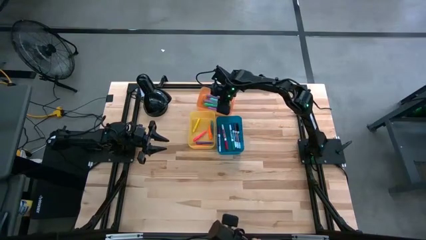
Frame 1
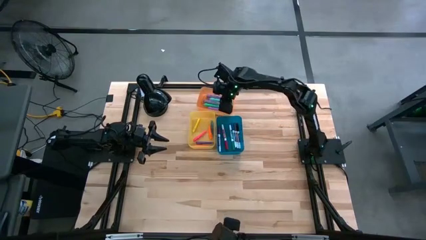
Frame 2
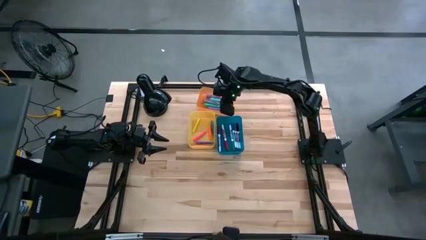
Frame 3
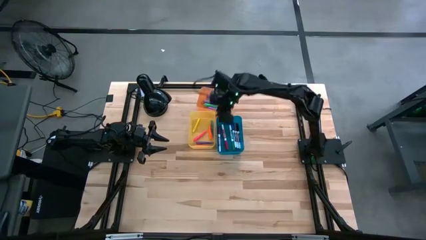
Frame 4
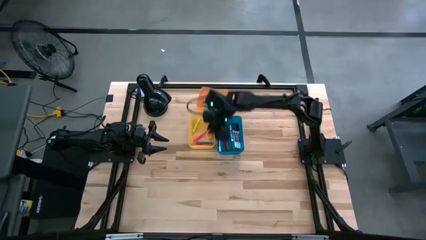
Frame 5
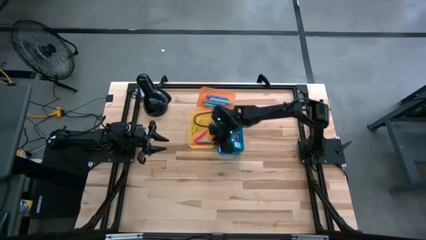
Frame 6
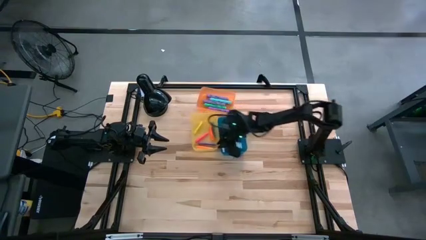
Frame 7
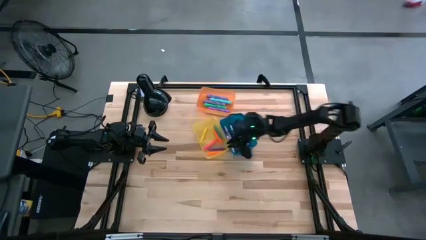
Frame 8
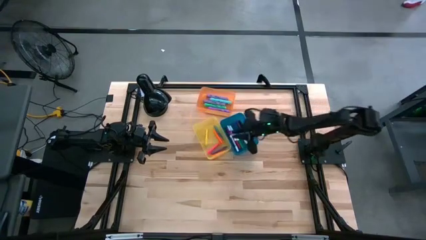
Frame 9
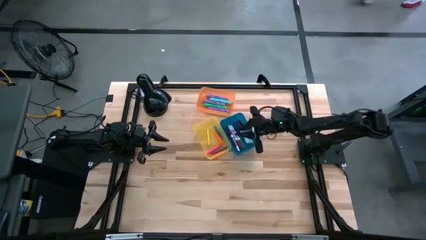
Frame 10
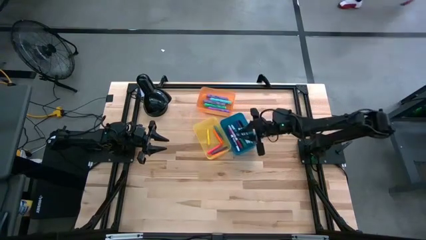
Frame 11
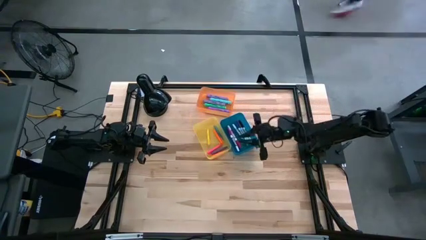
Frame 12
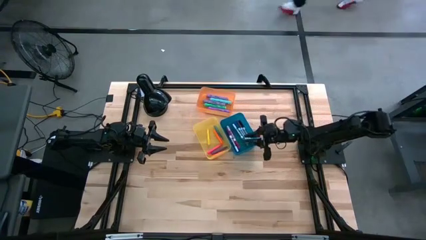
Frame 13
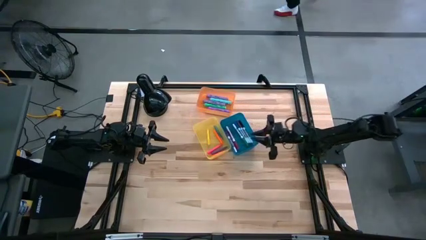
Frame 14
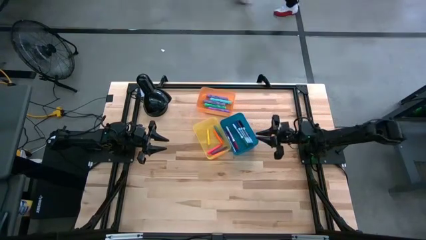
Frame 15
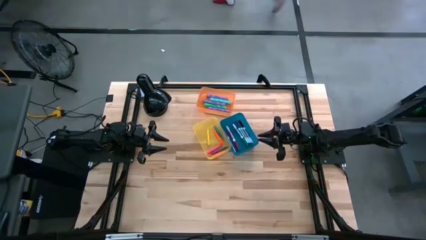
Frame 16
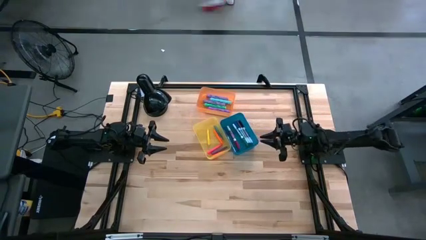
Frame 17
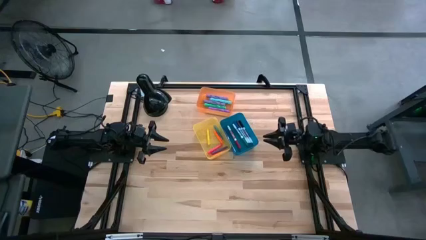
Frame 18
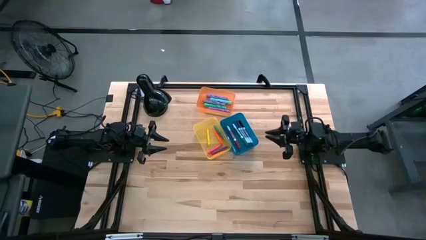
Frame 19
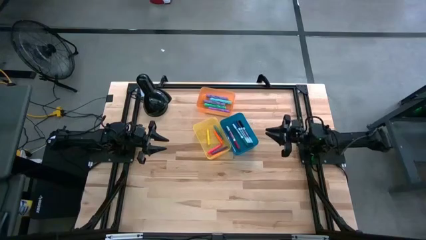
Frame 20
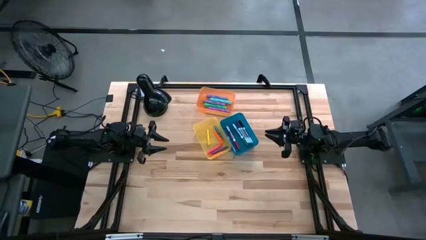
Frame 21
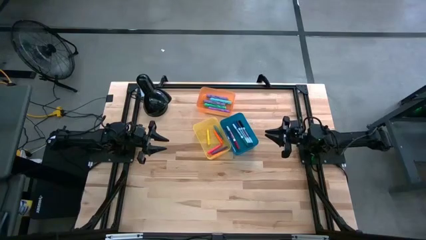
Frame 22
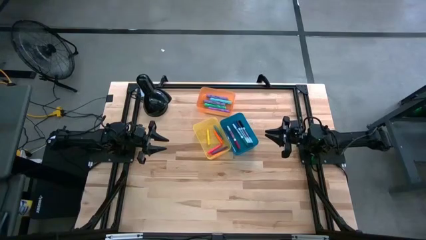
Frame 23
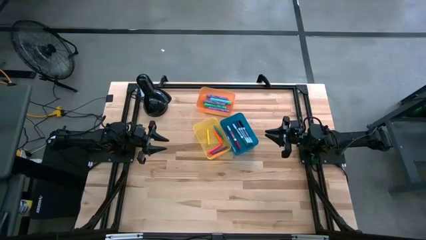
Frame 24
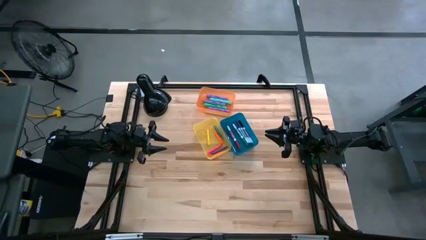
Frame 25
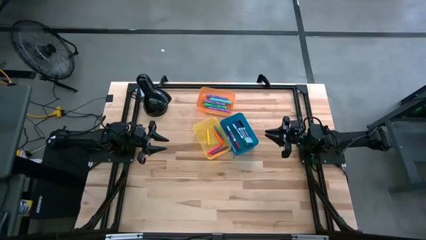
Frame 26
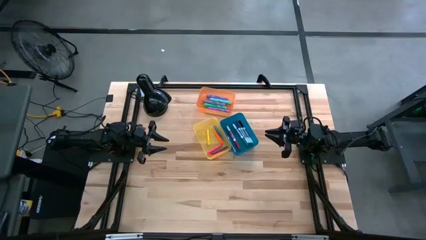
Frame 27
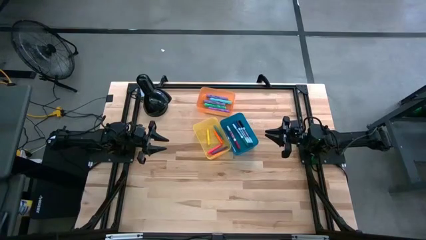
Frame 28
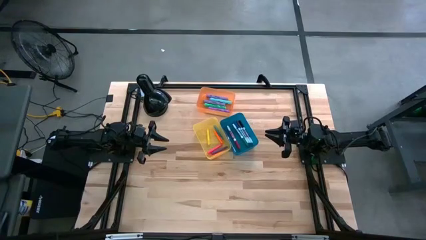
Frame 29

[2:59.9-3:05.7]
Task: Pick & Place Markers
Return to Home Position

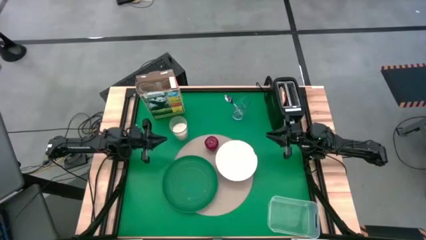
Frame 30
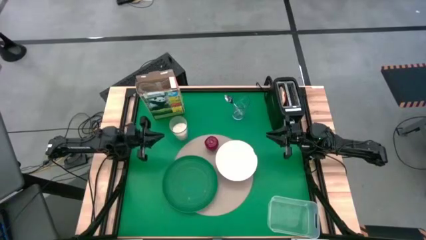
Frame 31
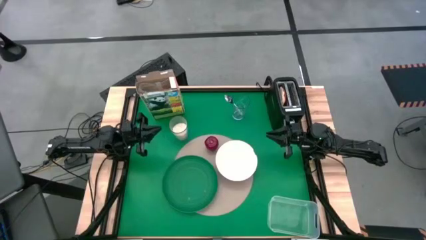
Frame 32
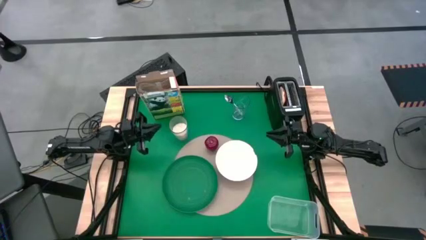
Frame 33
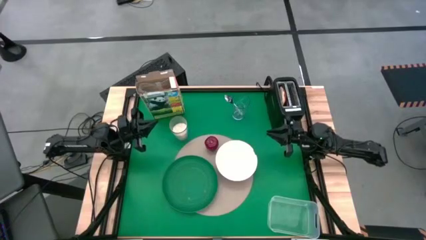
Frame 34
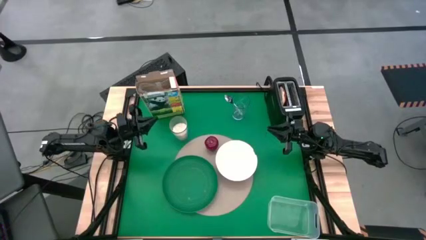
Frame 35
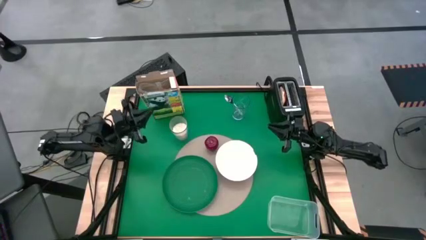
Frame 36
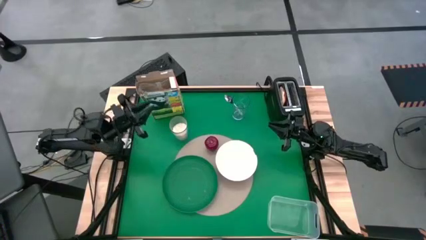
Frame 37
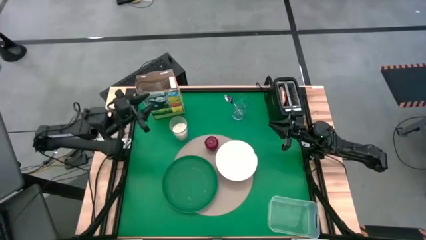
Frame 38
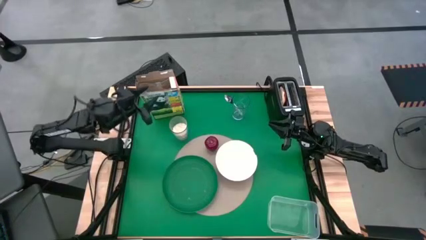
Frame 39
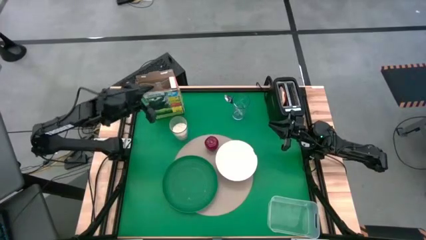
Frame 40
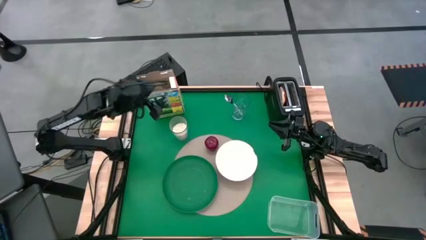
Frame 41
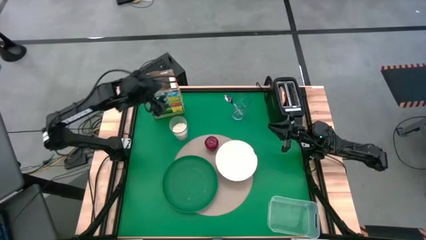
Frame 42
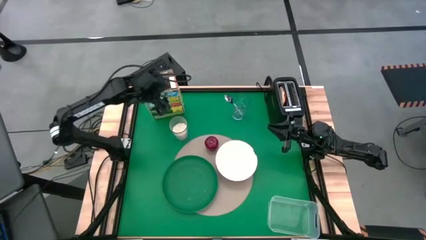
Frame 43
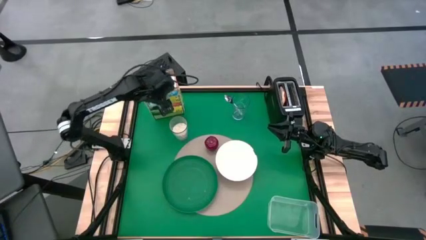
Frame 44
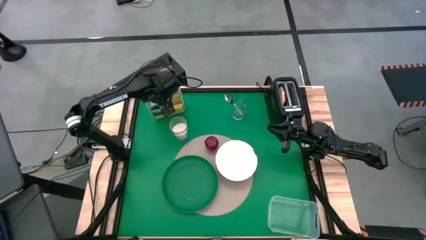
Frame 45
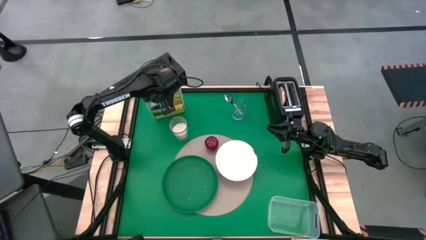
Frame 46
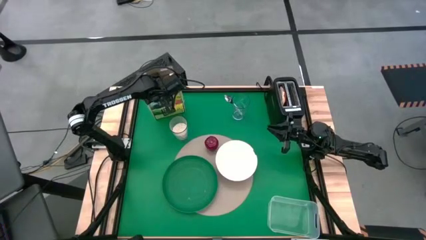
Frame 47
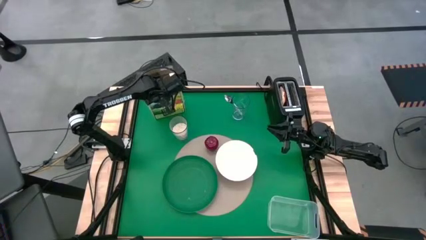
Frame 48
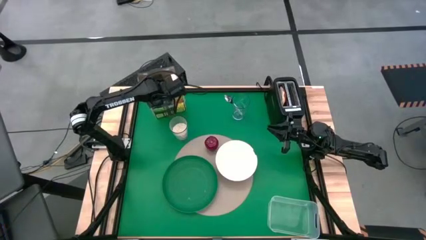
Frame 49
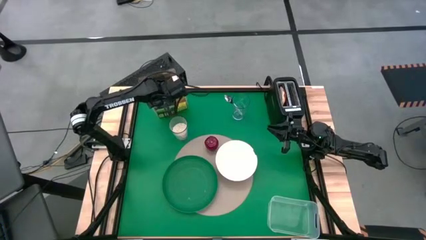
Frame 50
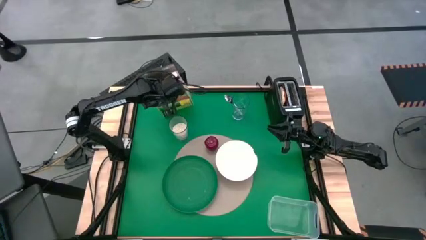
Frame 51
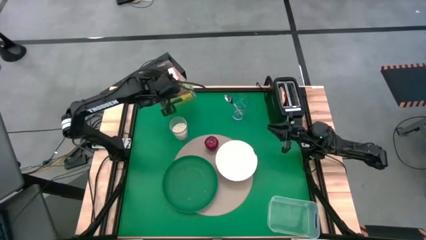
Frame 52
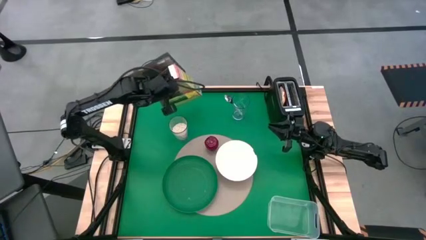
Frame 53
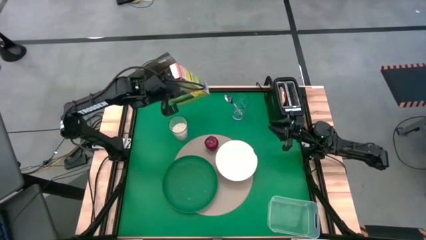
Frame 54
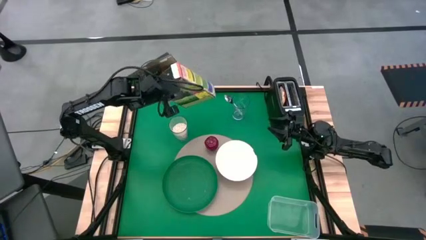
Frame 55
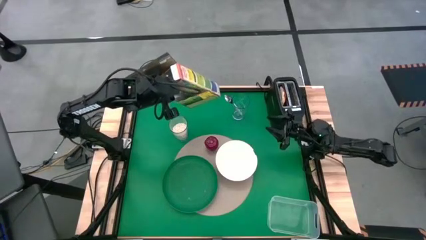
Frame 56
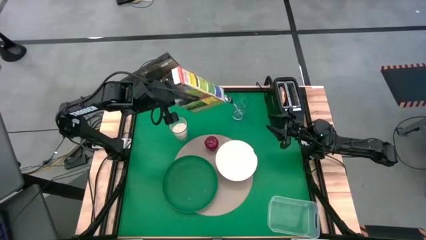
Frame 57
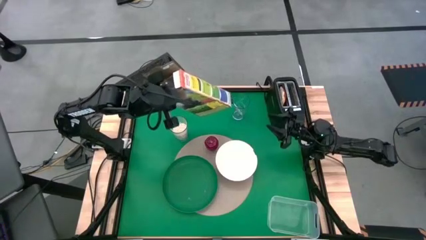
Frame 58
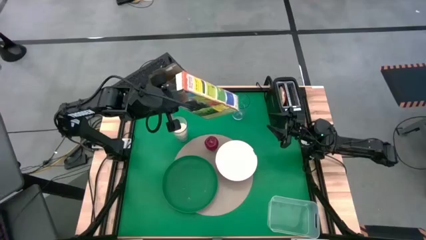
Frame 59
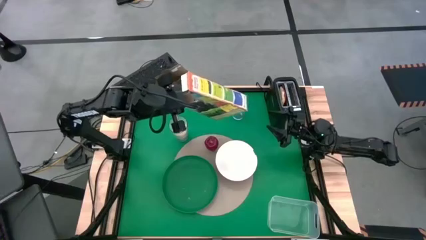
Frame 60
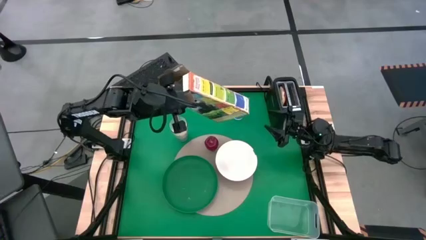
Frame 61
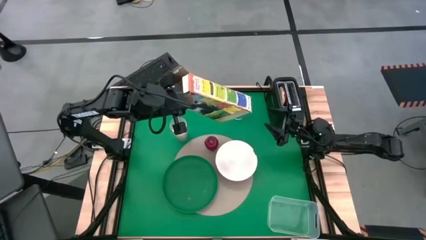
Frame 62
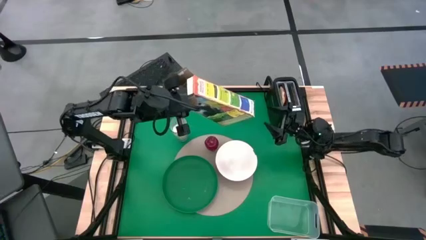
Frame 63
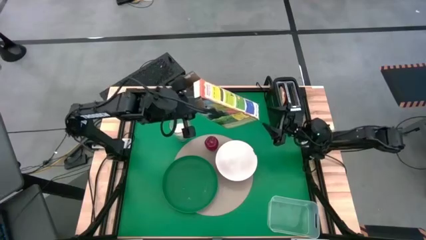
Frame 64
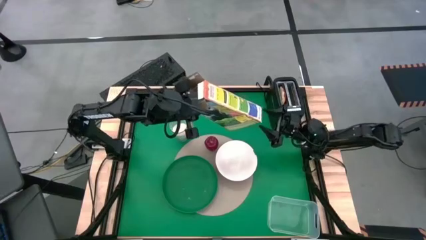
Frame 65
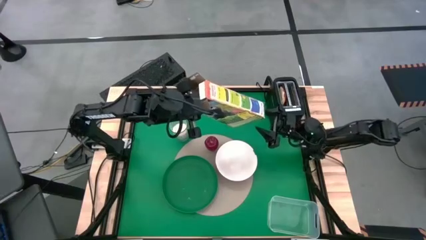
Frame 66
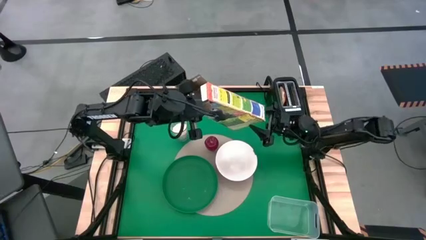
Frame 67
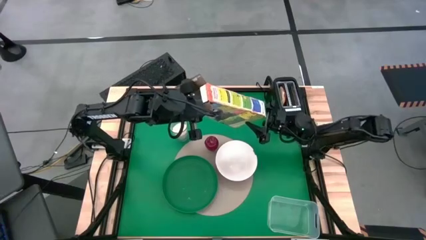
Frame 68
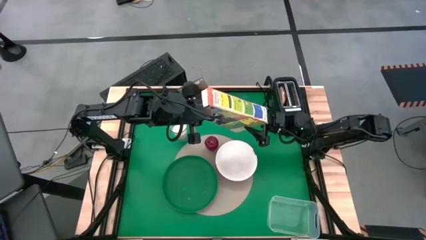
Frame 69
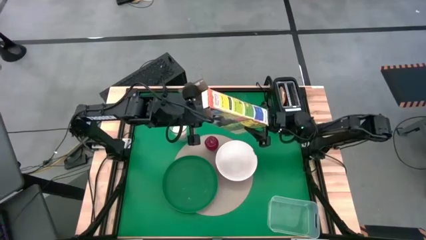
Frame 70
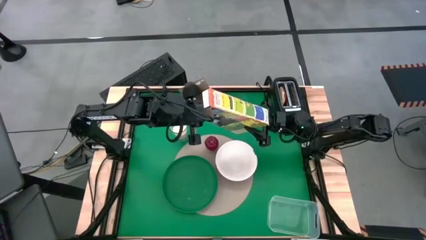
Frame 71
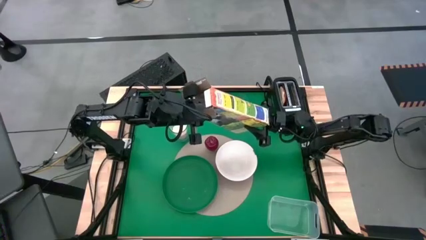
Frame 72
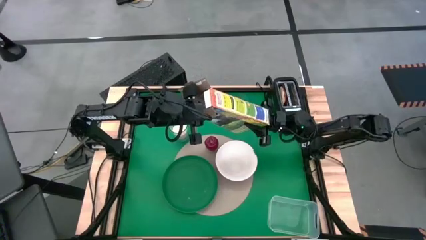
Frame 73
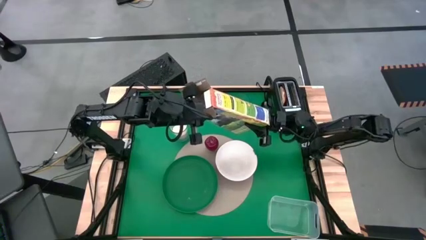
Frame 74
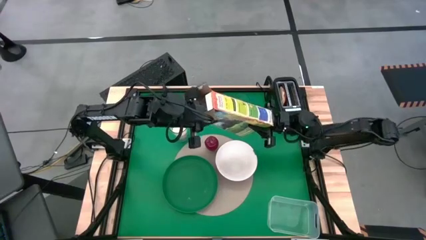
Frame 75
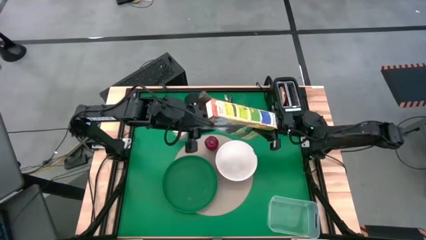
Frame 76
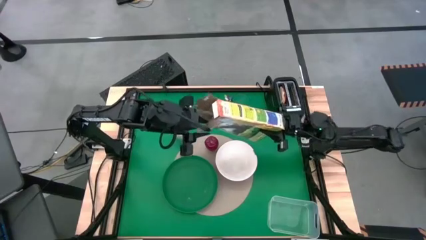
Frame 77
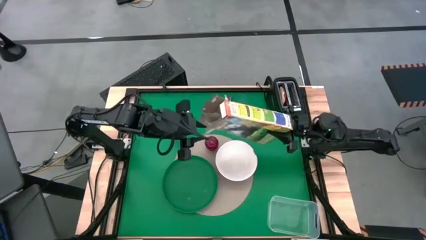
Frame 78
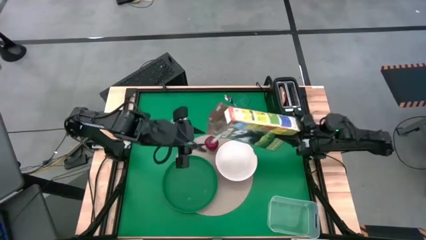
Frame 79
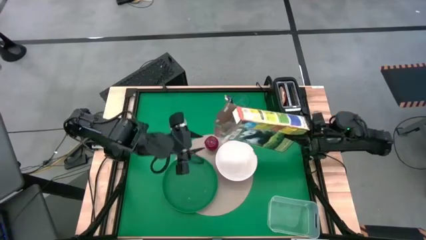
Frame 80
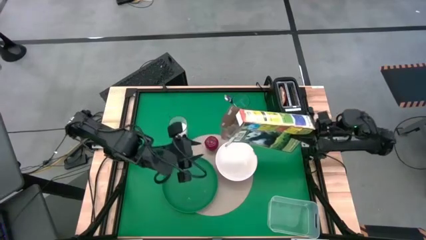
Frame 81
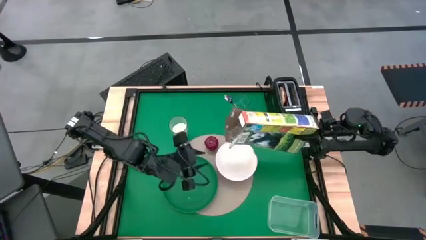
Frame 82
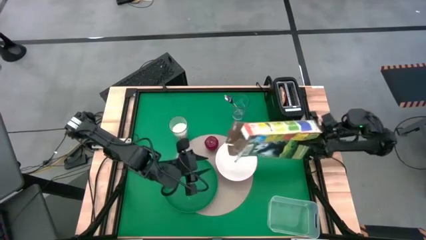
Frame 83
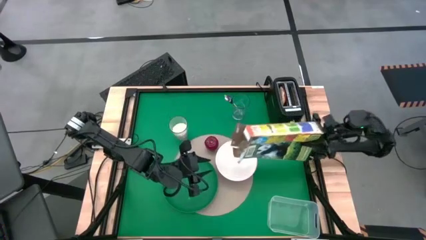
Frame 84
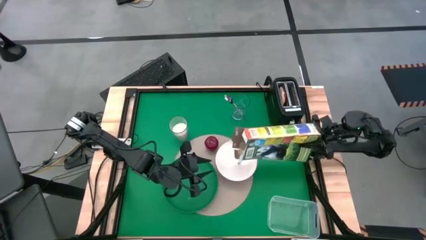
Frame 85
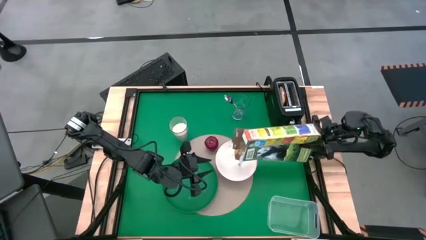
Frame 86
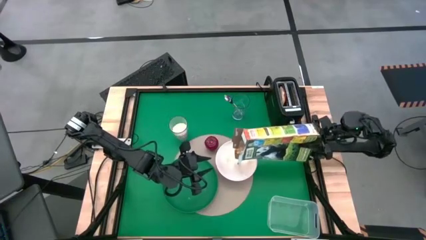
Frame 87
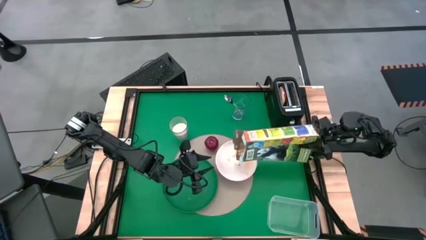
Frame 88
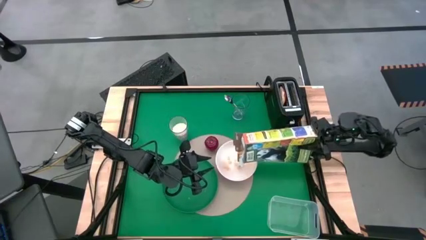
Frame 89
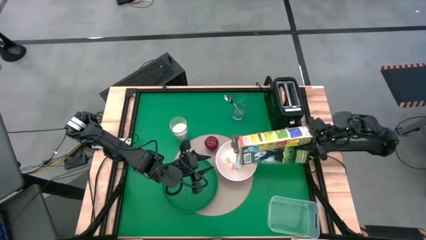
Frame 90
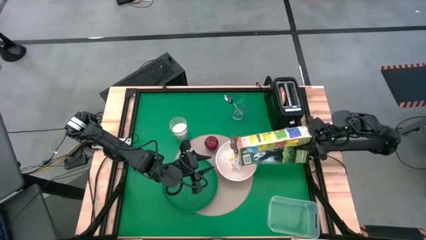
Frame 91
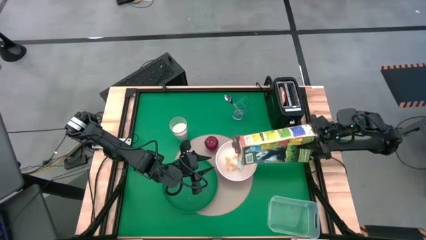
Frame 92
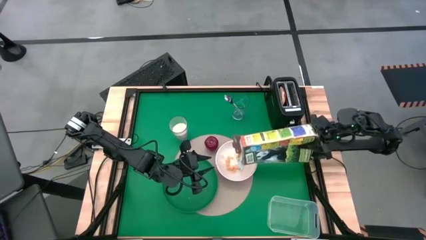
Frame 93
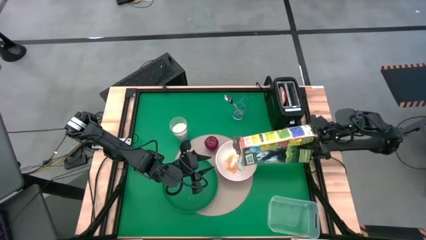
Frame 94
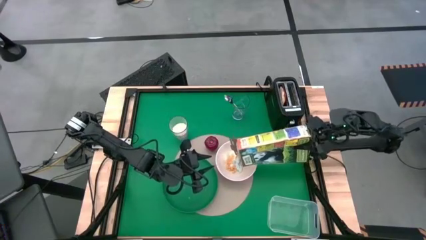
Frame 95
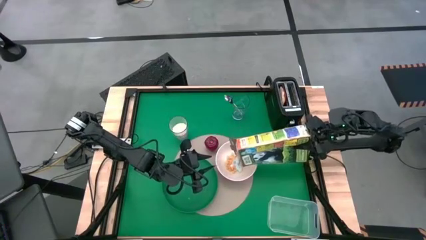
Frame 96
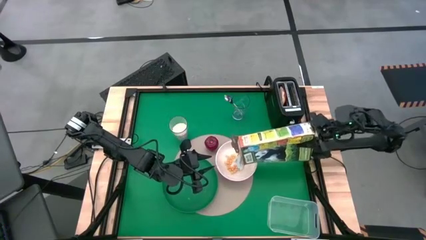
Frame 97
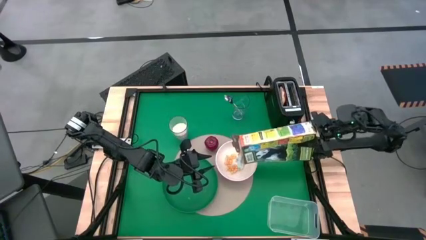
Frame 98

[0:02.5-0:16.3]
Task: Arrange a breakfast setting
Pour the cereal into the white bowl
